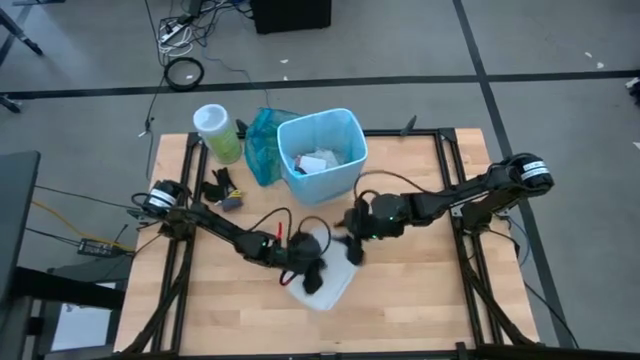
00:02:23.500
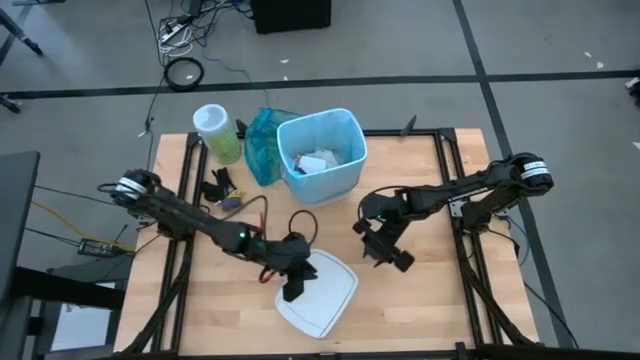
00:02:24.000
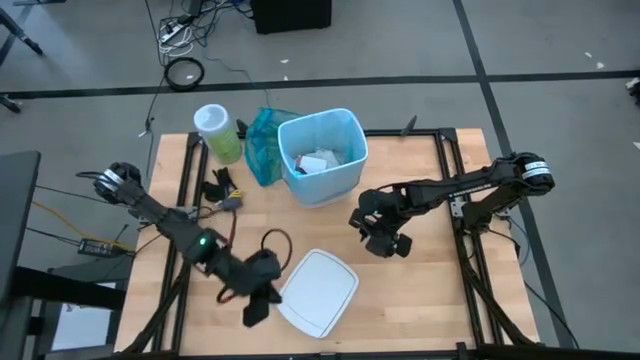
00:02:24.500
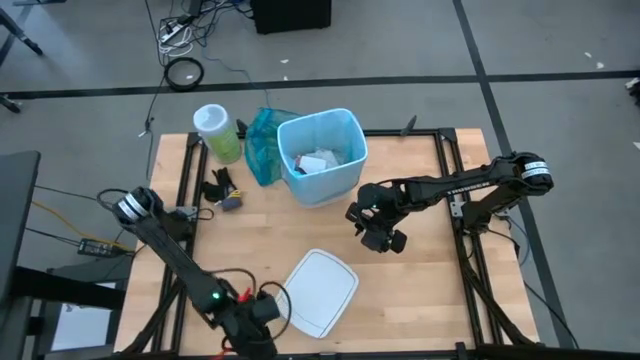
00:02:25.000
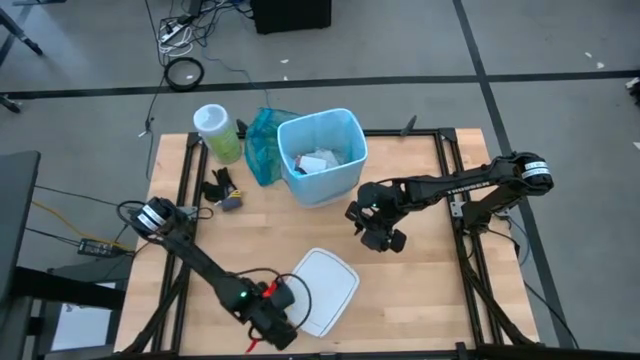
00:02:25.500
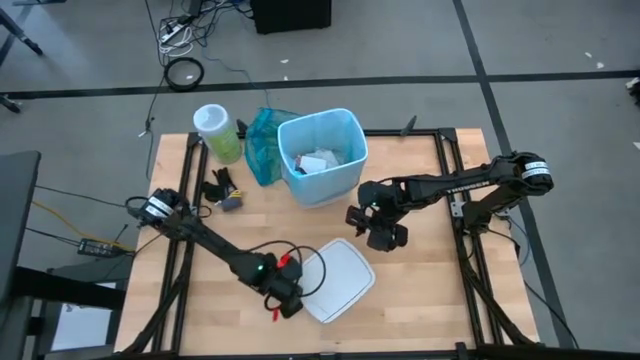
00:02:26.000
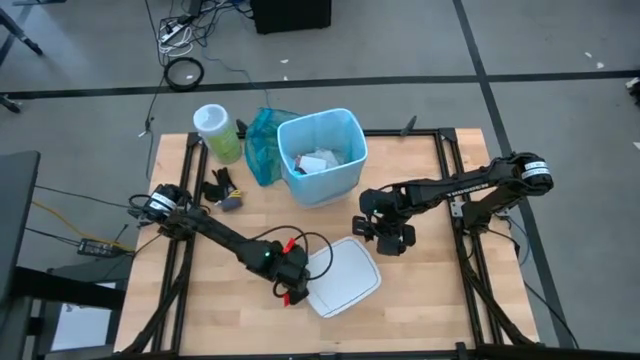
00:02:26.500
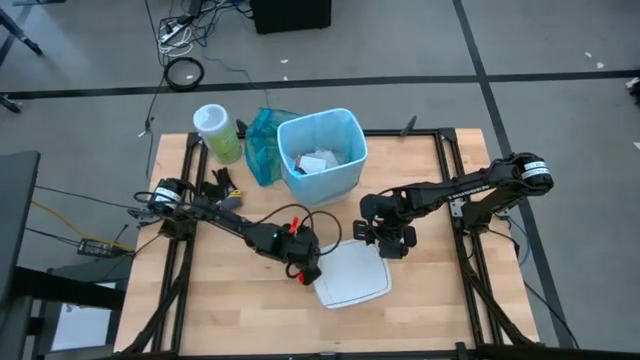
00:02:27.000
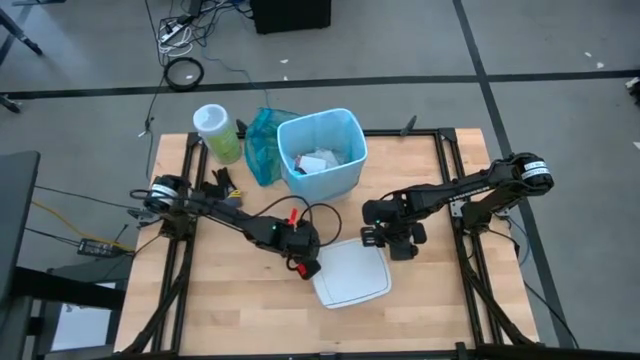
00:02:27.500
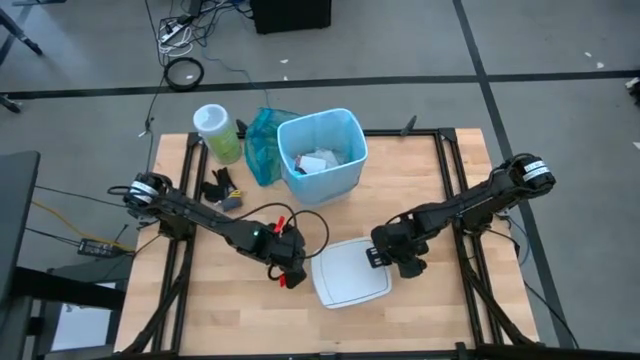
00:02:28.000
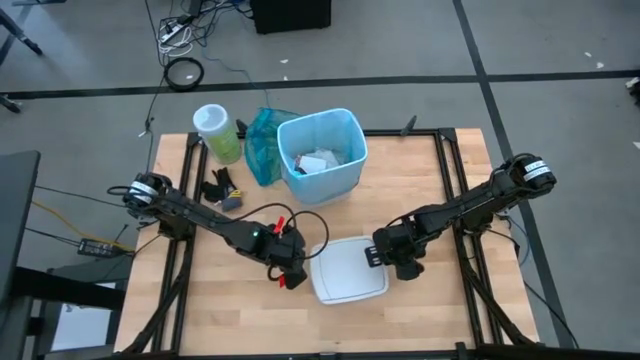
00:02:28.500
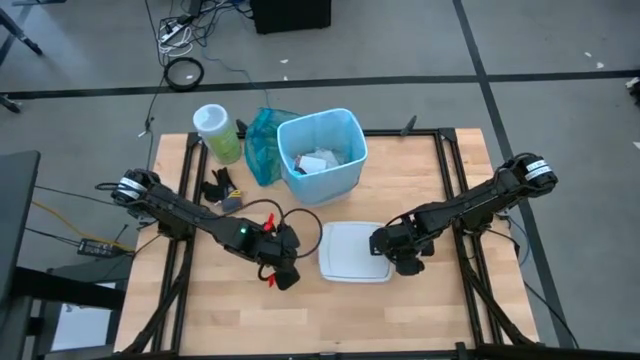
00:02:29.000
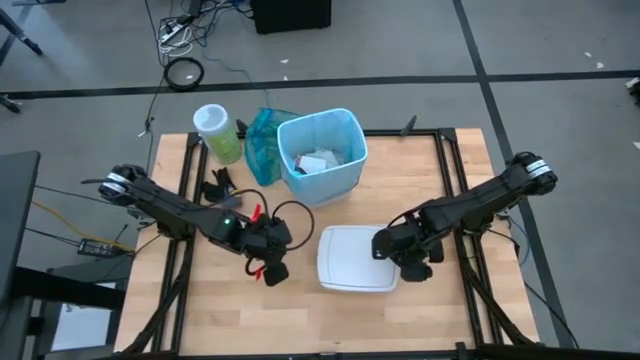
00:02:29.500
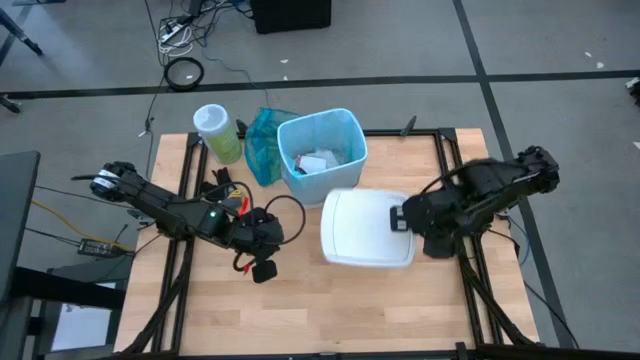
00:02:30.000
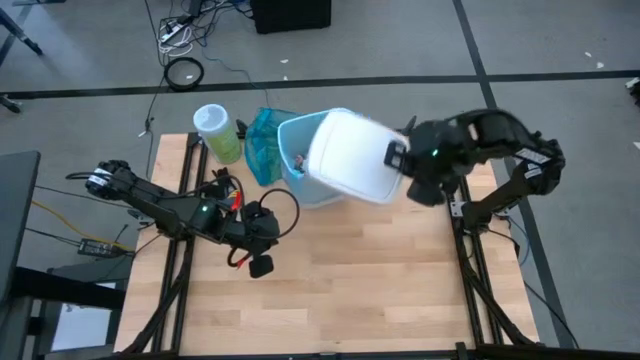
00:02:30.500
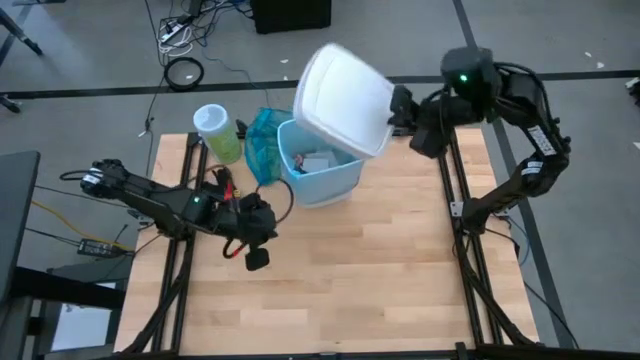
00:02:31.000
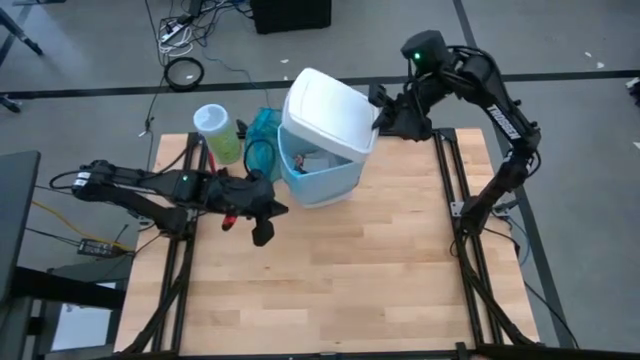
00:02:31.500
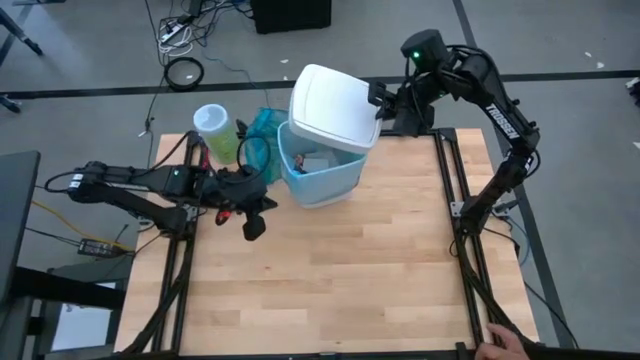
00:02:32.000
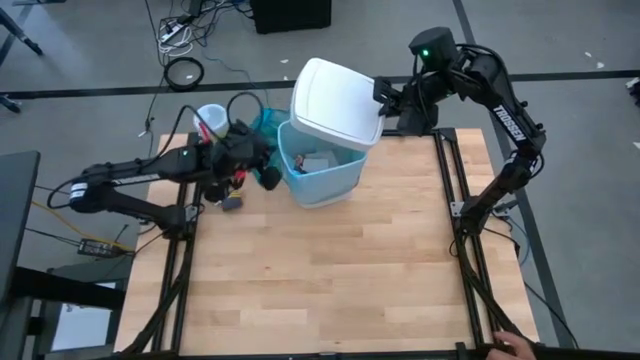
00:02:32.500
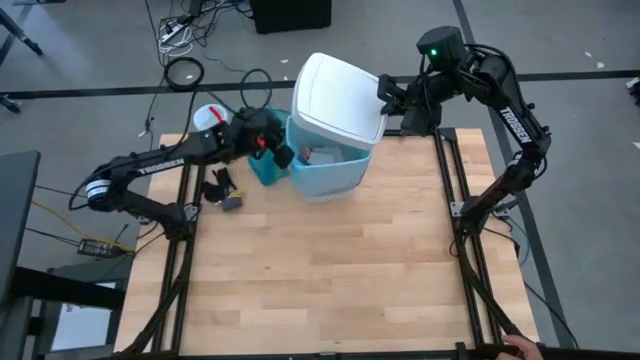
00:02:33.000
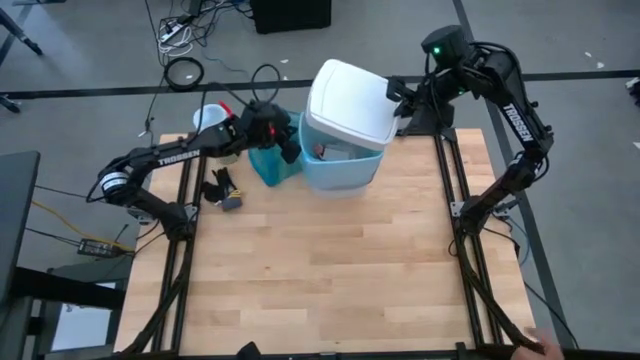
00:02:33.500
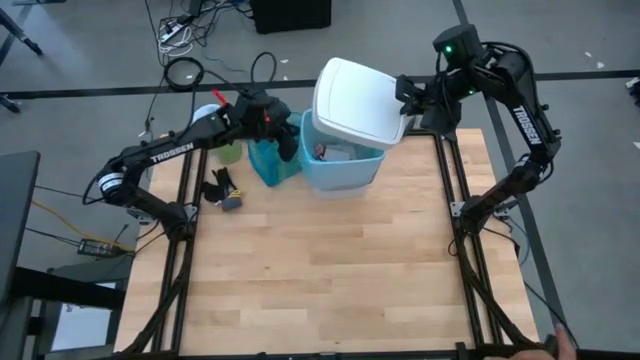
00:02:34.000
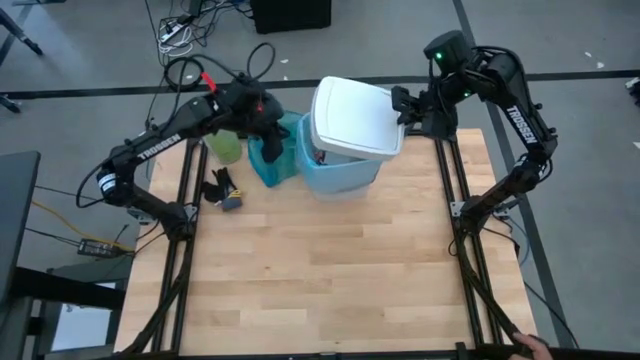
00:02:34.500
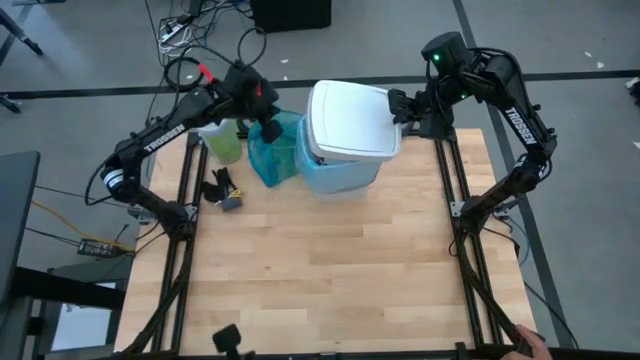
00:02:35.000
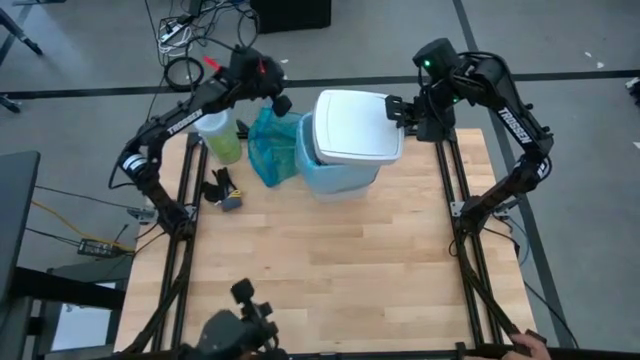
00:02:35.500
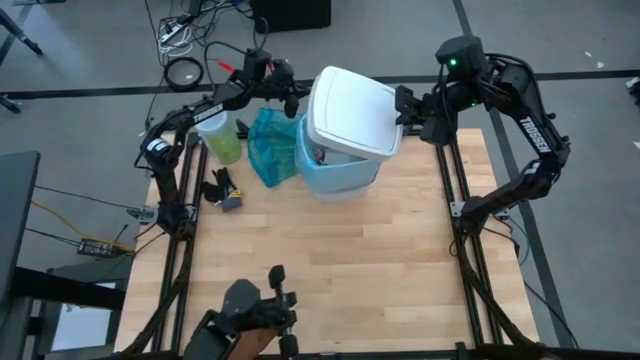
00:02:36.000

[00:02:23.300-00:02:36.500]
Task: place trash/remove bag and relplace
Put the white trash lid on the white trash bin

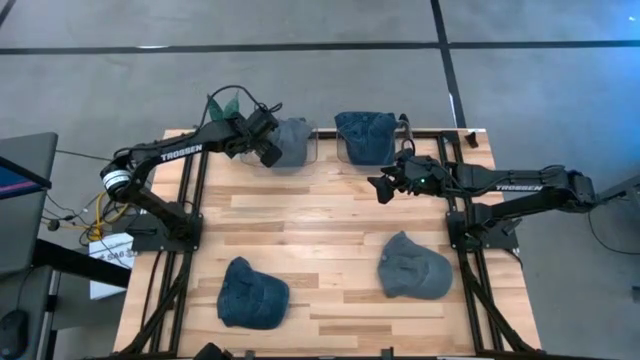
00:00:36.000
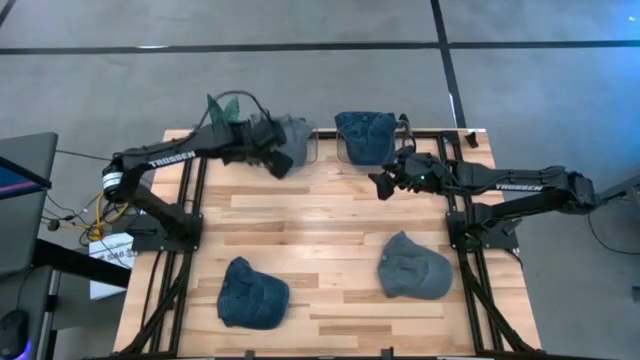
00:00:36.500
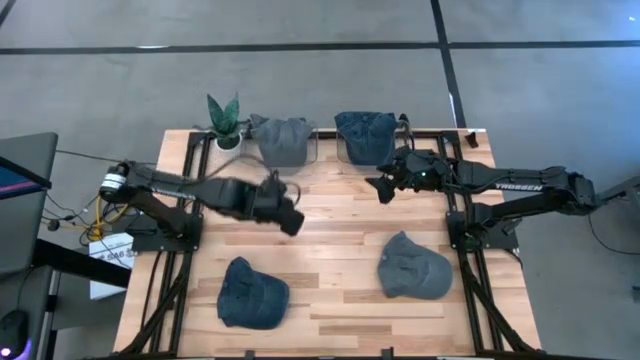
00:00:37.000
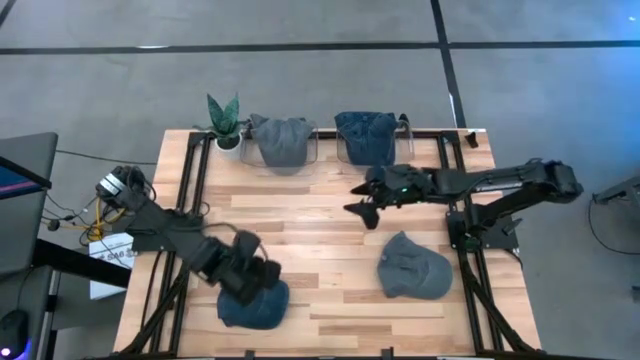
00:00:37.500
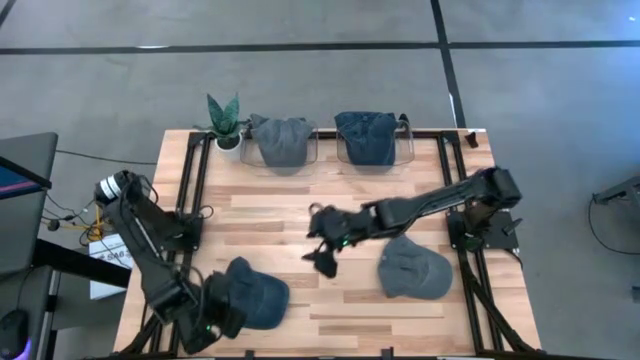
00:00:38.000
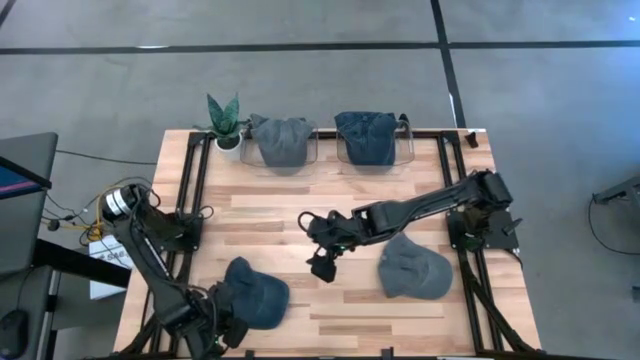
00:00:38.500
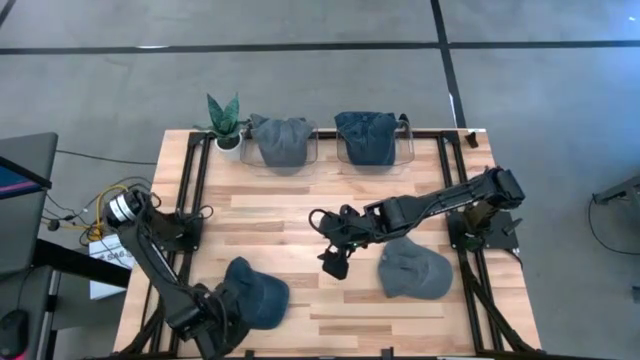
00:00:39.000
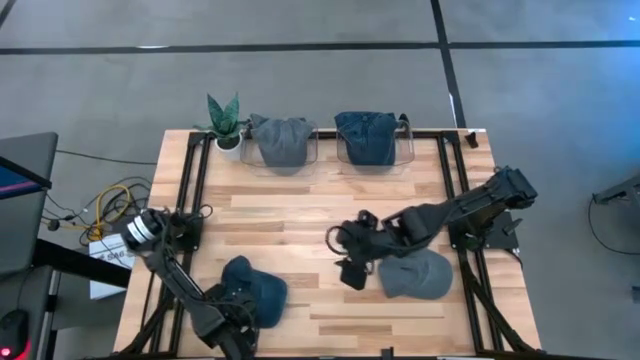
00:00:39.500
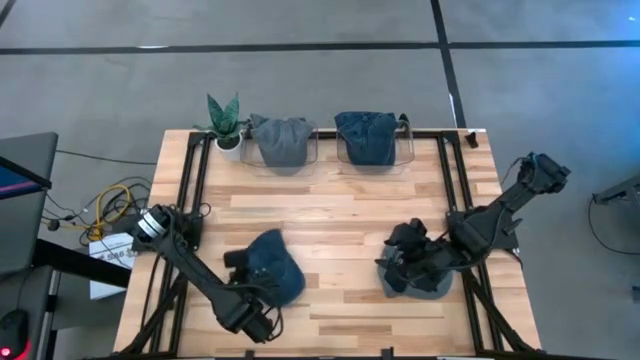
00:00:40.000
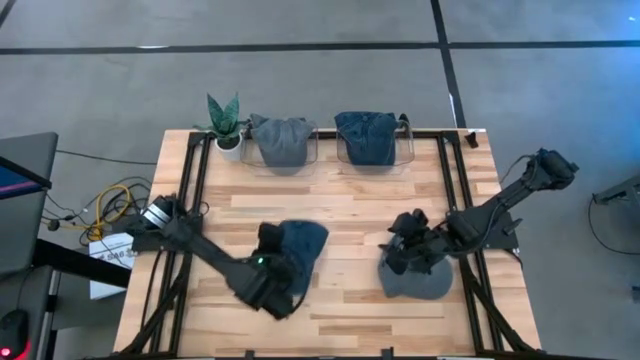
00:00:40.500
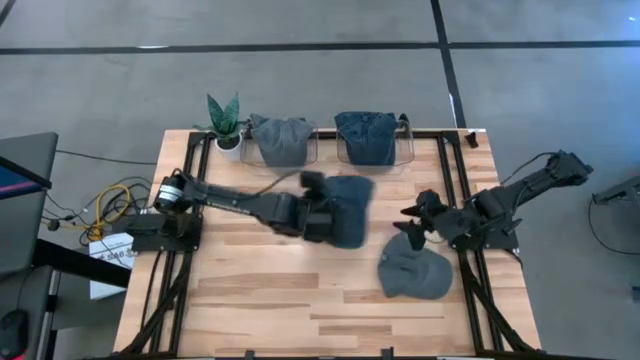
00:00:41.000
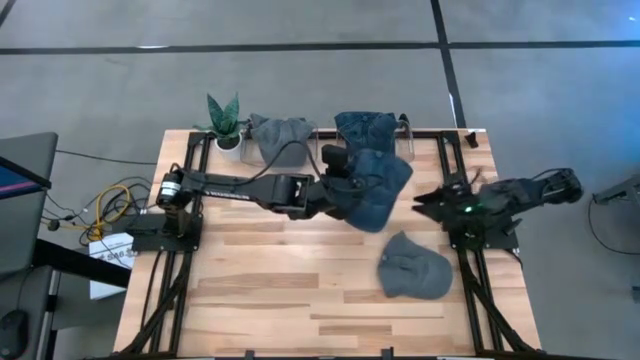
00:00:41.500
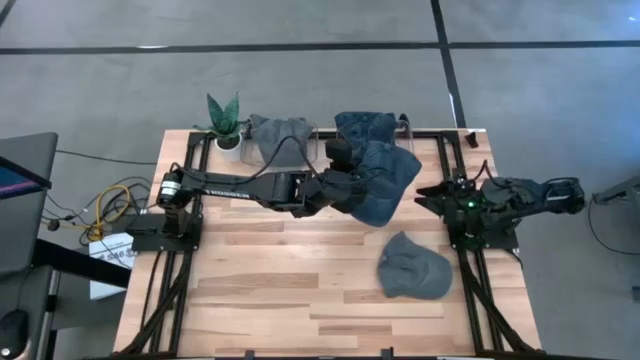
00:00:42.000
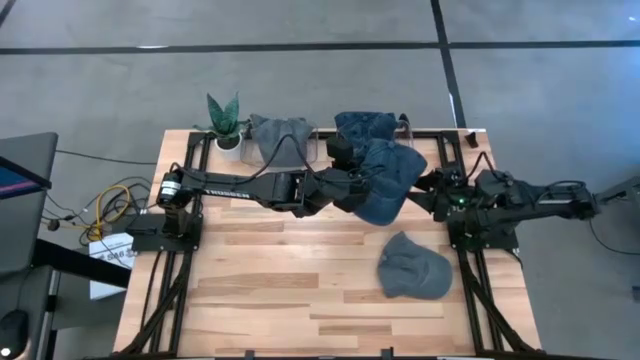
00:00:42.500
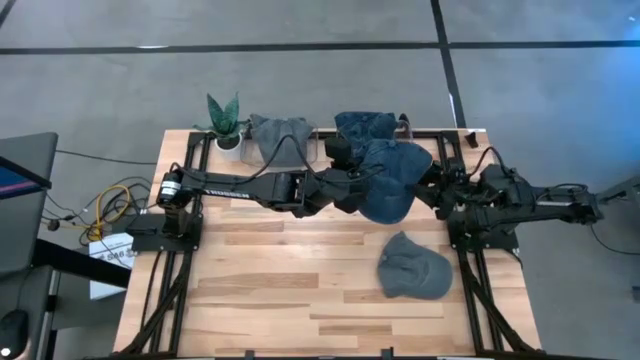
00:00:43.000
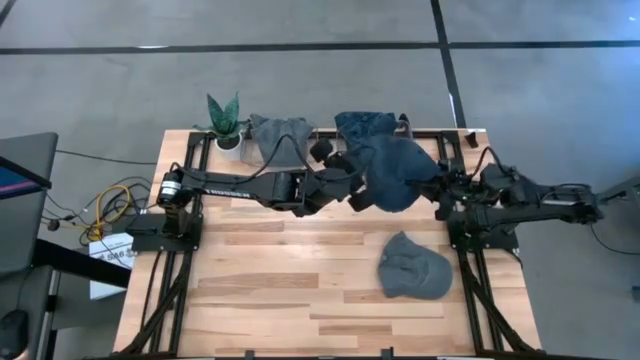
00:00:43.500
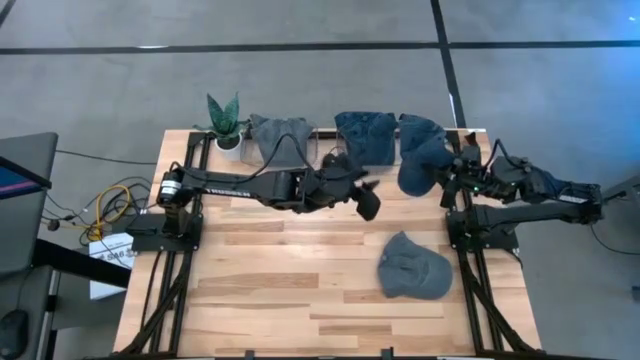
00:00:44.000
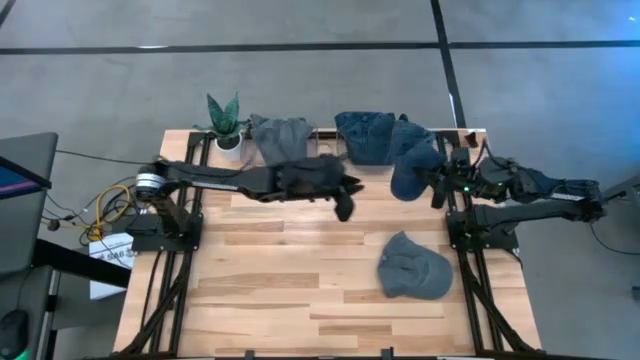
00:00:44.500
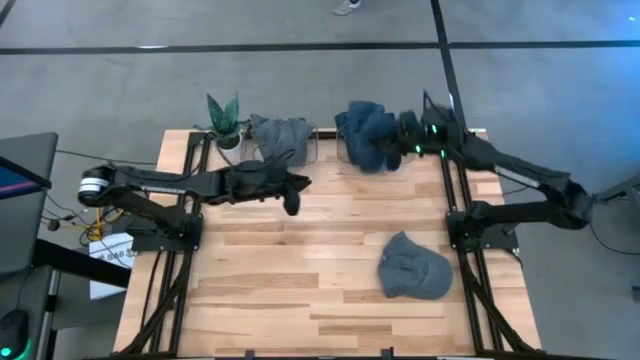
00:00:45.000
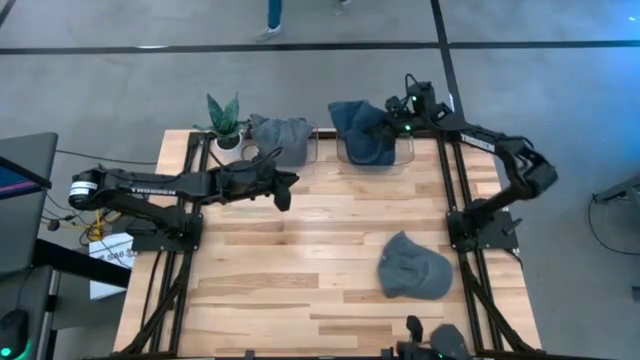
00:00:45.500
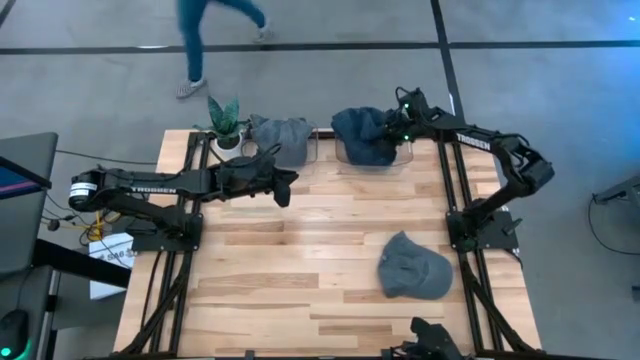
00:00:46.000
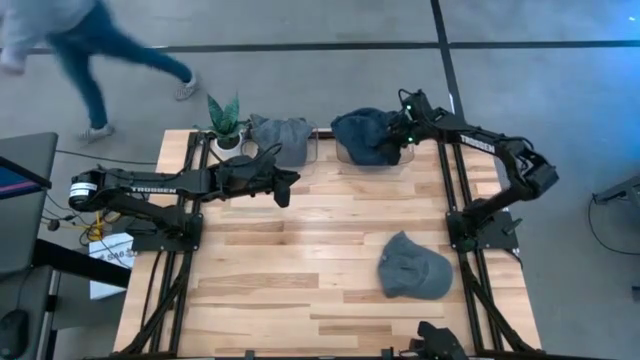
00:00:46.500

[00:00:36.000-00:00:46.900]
Task: Pick & Place hat
Put the blue cap into the right transparent bin
